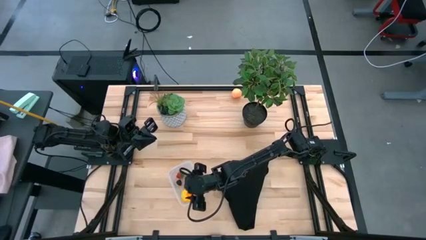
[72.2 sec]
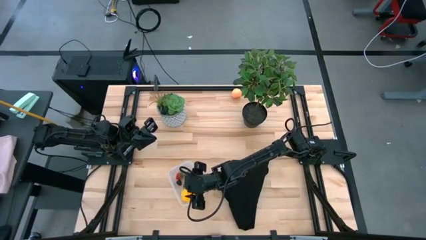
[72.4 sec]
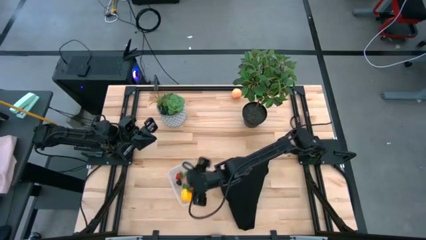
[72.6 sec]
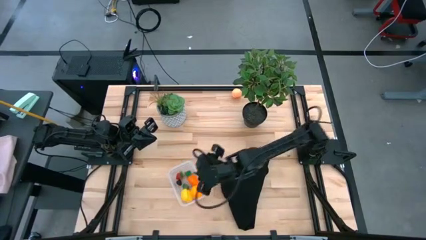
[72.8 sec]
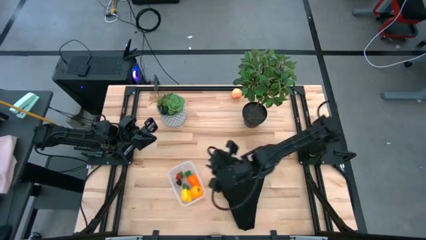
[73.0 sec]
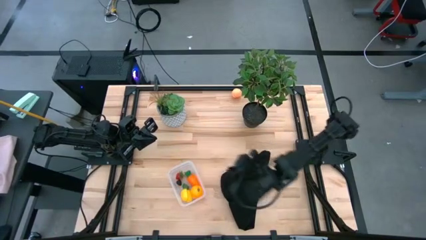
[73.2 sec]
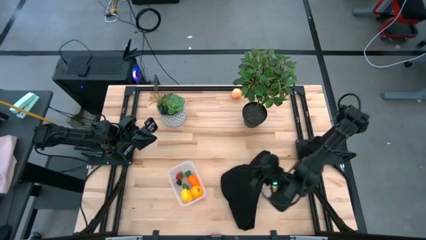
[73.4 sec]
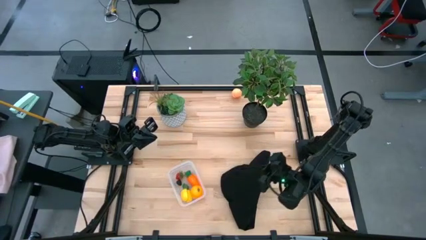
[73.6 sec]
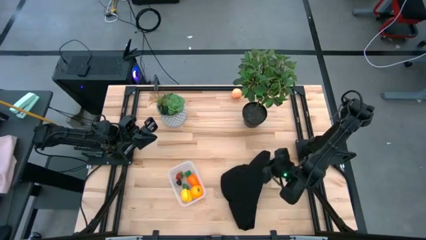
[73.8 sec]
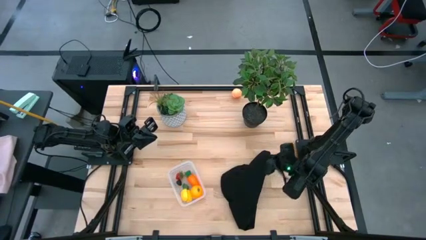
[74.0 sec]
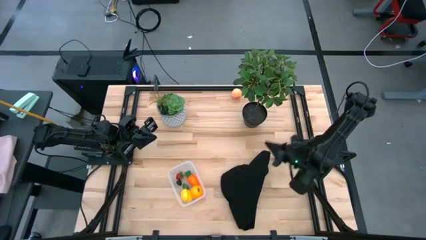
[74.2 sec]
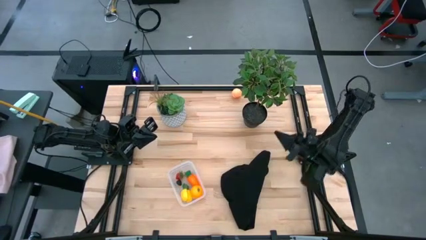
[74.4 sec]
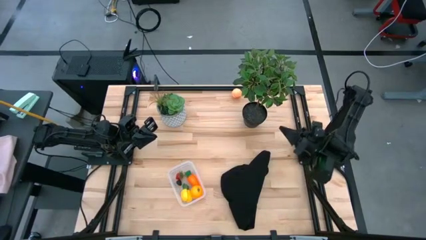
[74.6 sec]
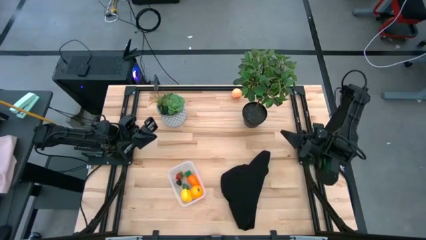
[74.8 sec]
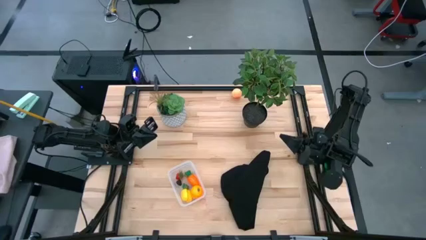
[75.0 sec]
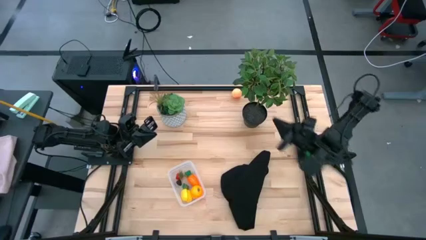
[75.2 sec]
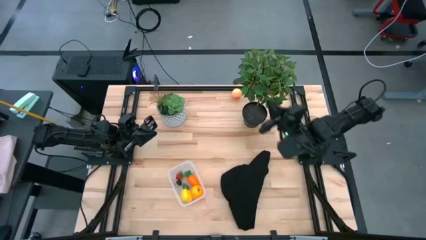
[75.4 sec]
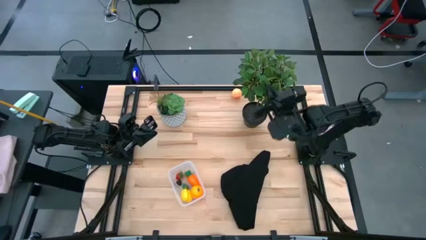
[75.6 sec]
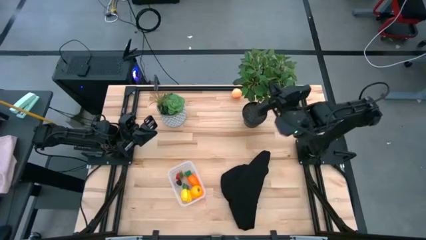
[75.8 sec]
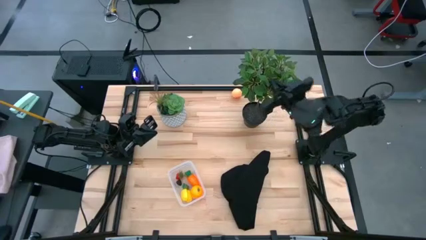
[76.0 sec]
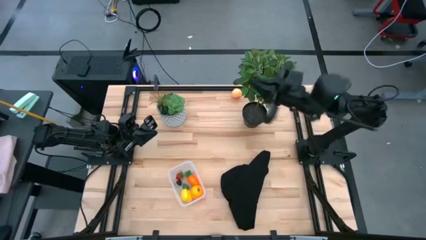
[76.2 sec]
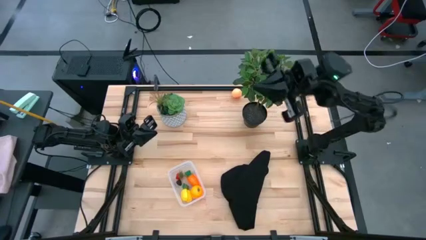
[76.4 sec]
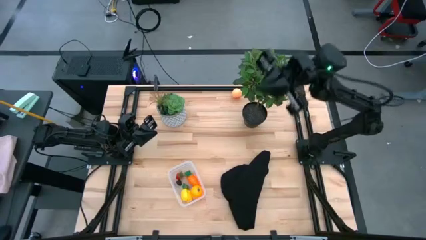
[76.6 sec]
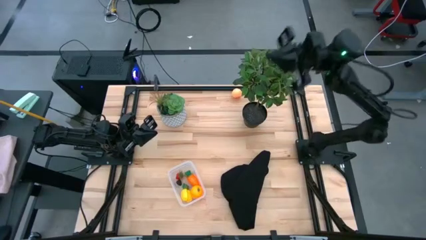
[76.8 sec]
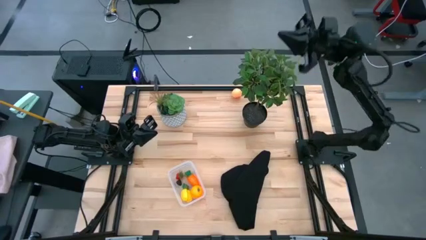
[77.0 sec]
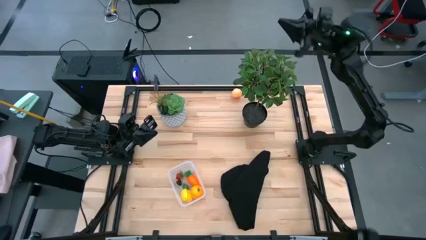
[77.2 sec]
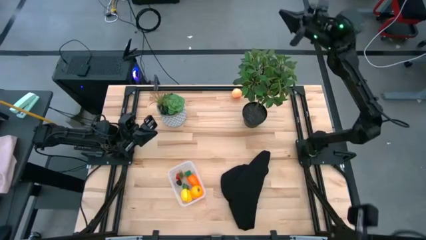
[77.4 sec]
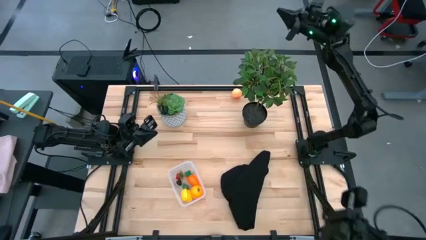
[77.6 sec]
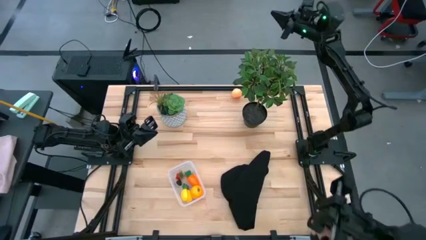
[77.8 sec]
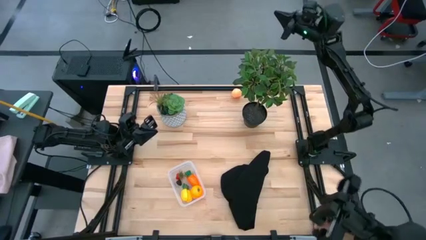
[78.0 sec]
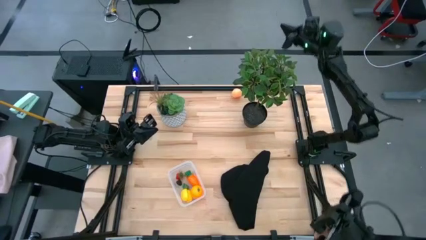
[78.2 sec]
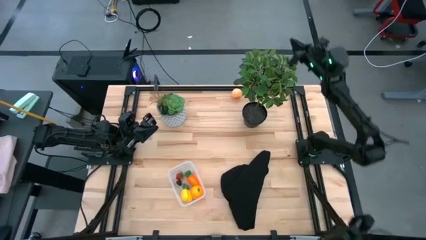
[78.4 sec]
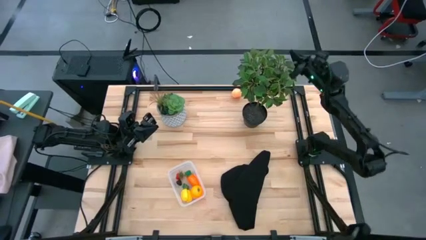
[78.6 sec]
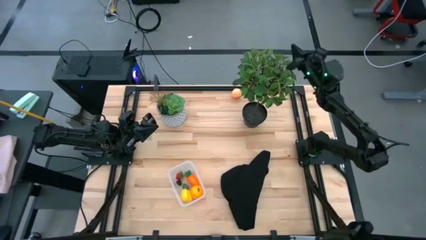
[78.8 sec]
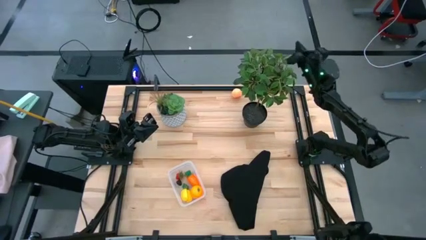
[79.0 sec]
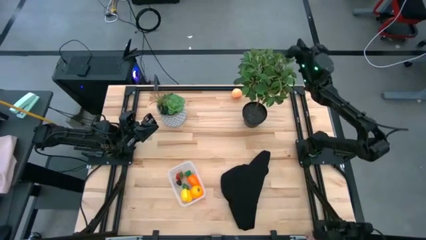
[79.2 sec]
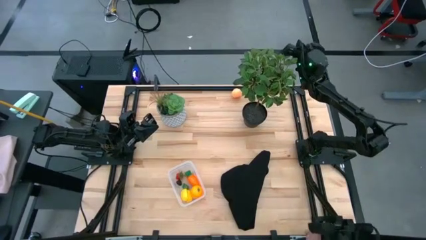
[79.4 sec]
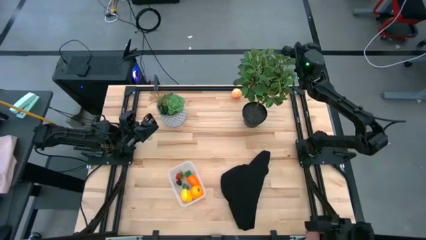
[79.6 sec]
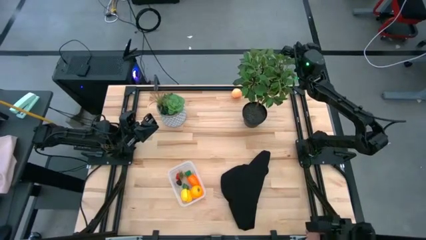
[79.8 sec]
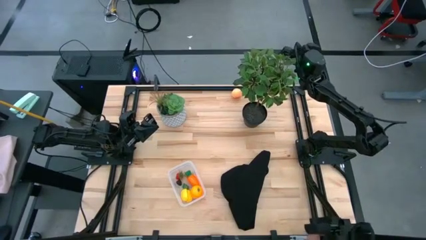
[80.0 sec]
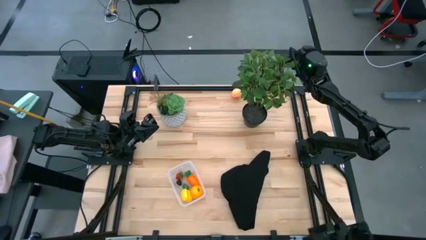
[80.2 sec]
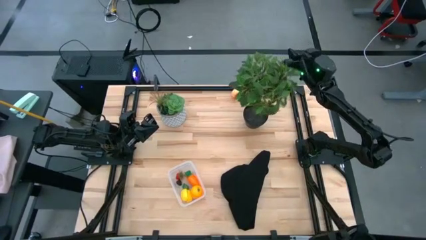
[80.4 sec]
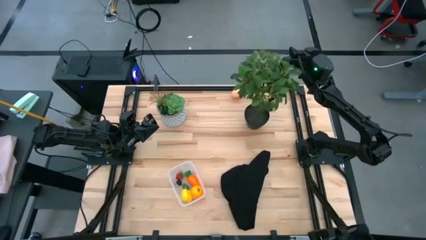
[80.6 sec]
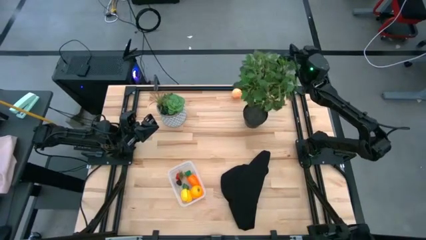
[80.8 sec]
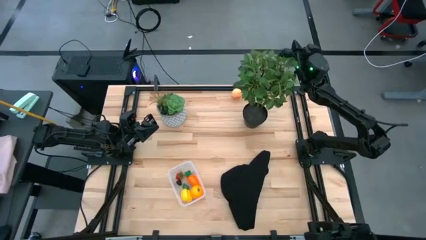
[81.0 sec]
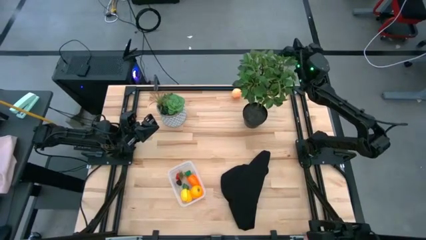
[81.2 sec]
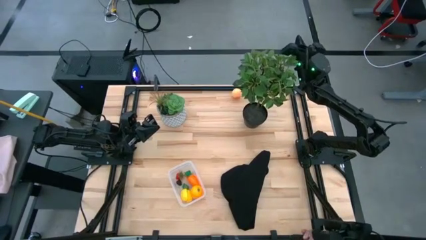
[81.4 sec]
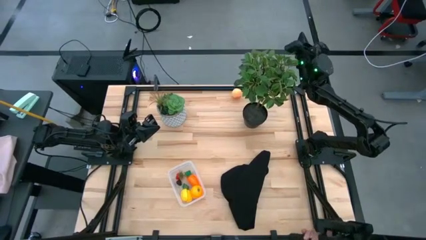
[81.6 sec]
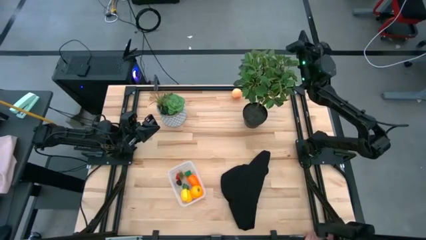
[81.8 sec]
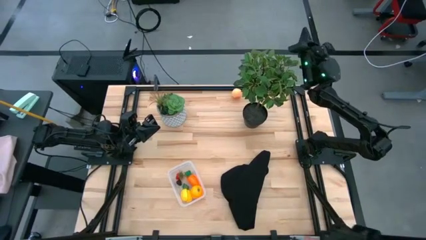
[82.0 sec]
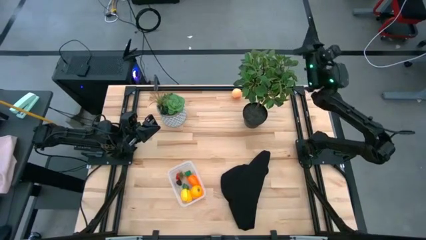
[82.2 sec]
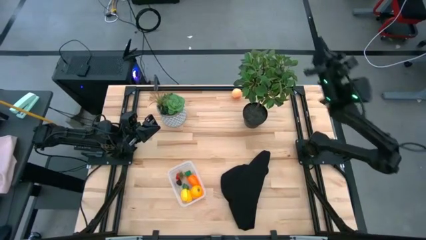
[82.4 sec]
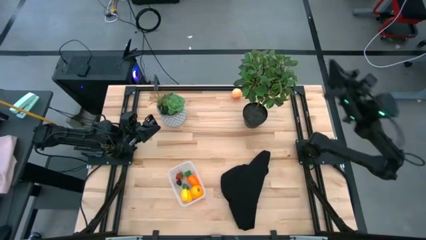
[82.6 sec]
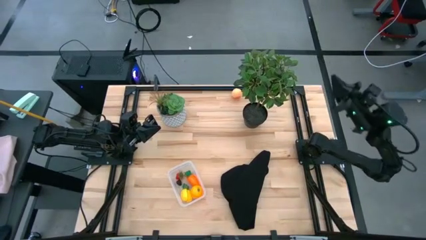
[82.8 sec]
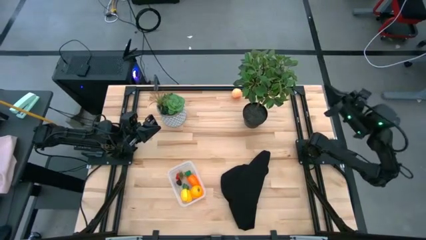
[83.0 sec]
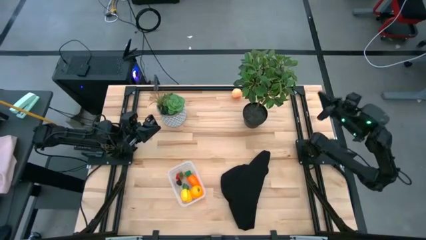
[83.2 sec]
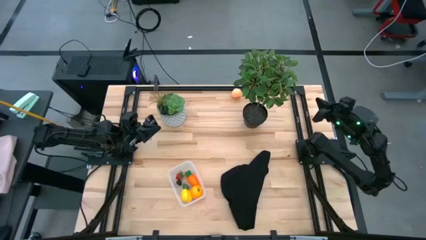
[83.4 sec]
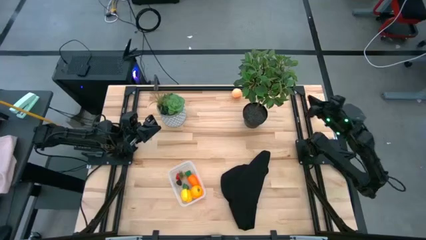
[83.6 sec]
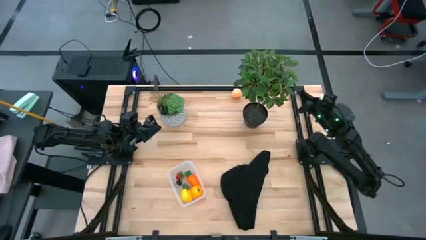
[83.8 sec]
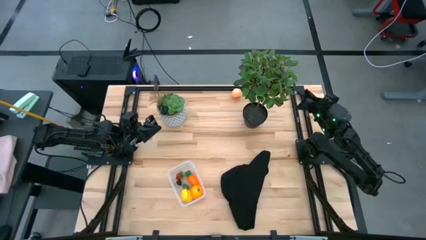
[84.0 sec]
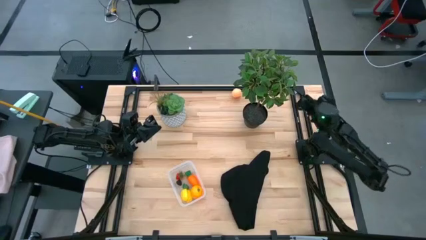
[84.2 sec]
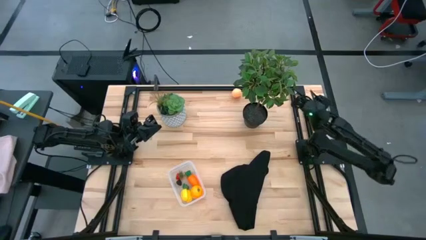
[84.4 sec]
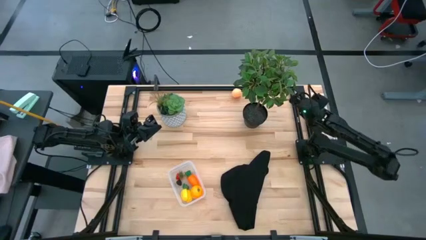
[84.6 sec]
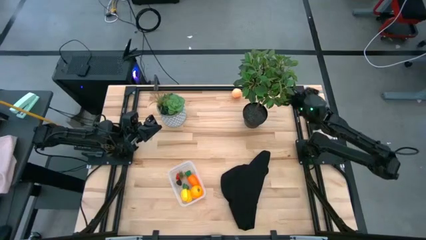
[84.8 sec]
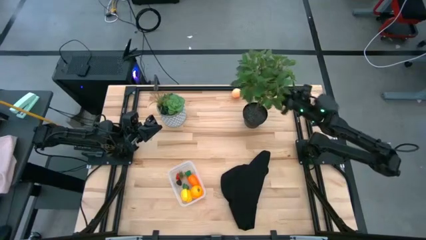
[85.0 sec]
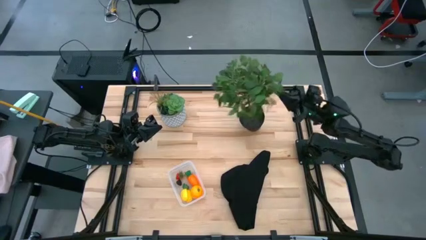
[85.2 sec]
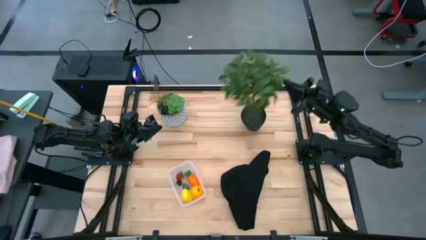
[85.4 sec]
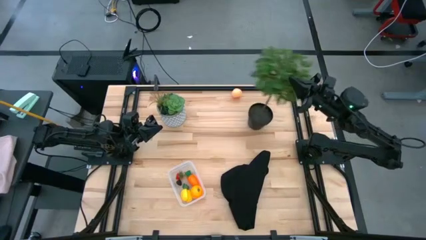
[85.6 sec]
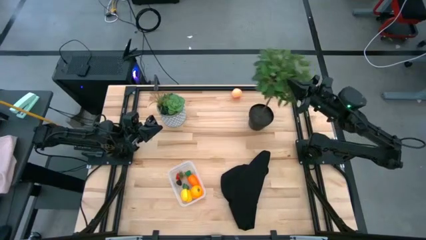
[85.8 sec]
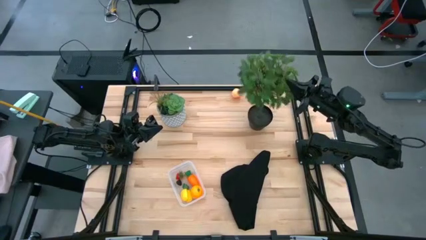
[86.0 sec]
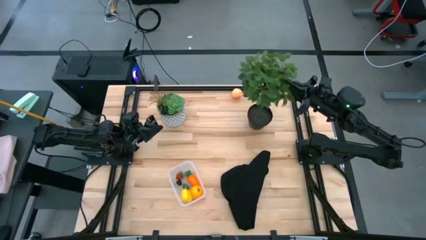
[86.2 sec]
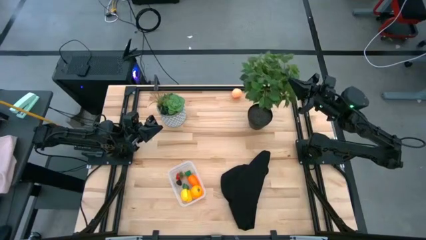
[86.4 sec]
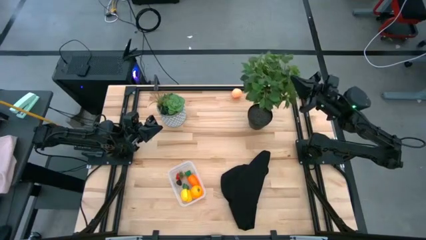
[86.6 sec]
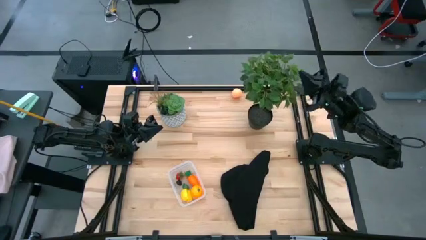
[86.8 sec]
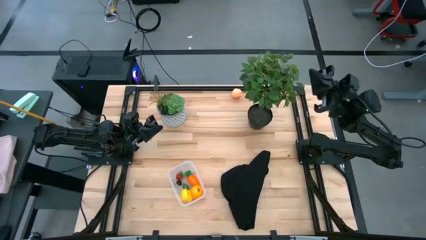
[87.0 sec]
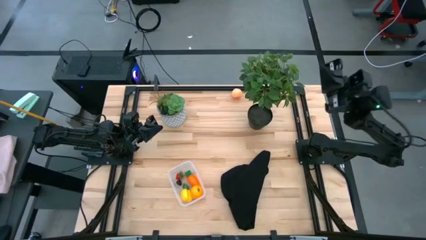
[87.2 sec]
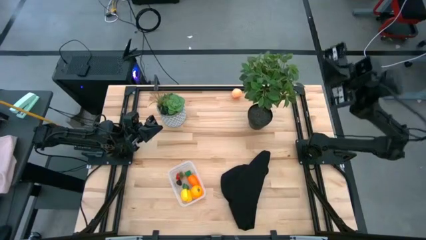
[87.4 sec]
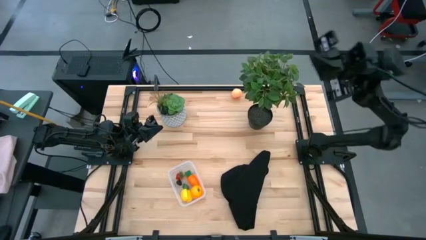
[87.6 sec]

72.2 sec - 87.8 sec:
Task: Pick and placing Produce into tupperware
Put the peach into the transparent bin
